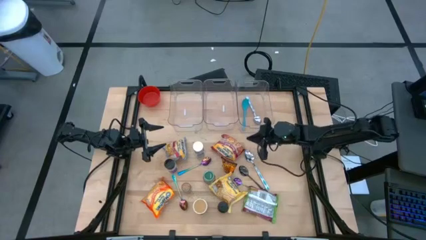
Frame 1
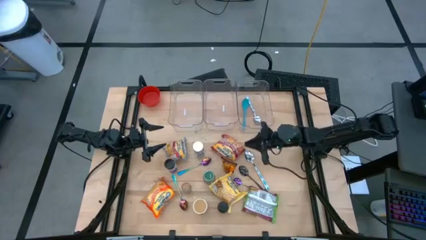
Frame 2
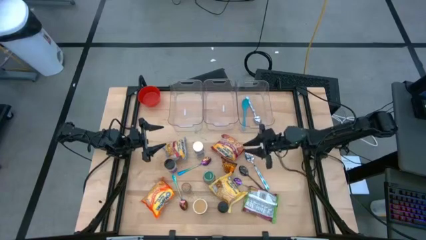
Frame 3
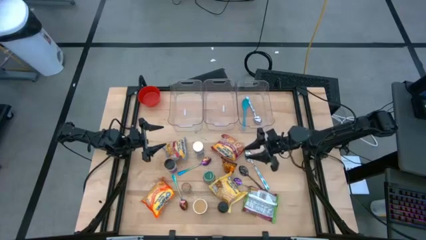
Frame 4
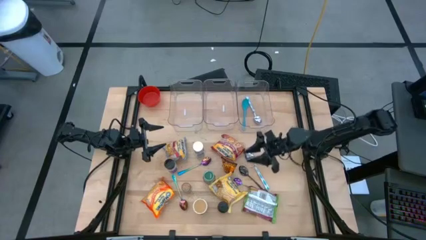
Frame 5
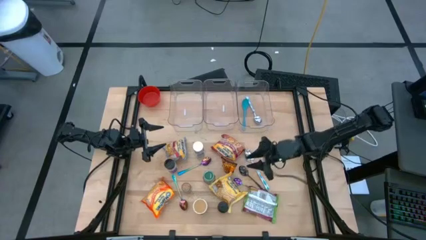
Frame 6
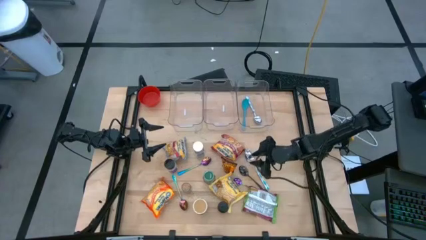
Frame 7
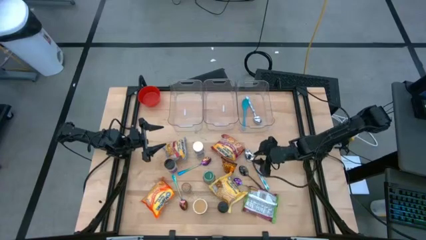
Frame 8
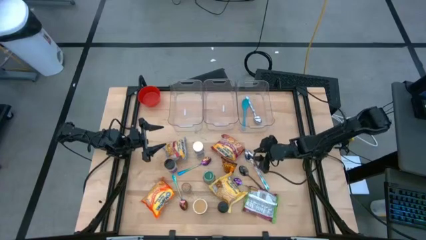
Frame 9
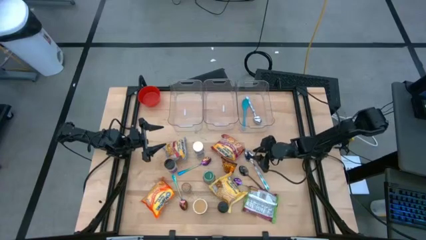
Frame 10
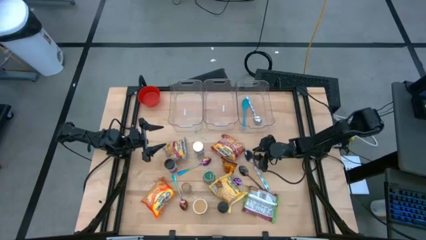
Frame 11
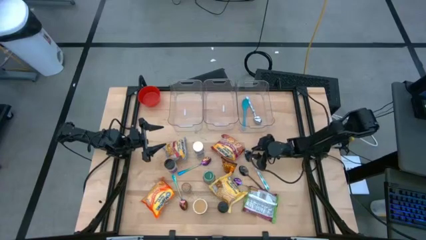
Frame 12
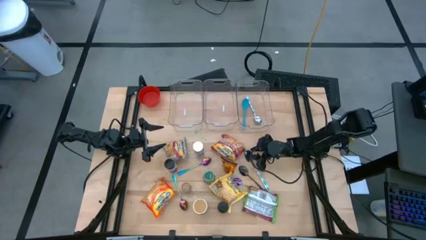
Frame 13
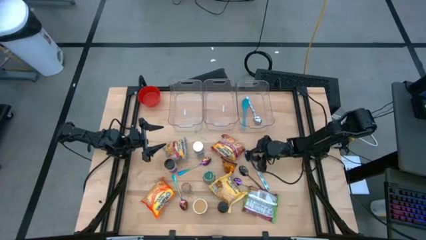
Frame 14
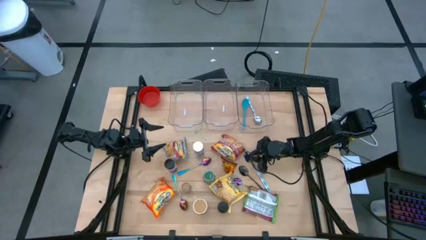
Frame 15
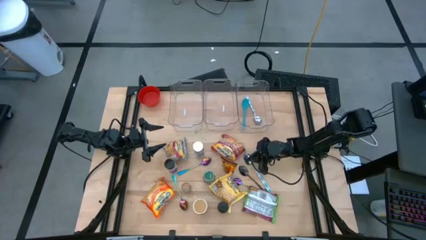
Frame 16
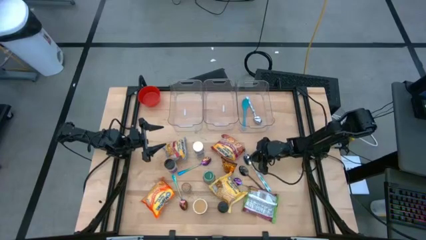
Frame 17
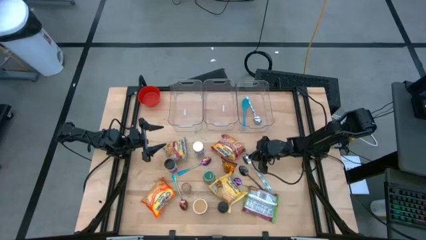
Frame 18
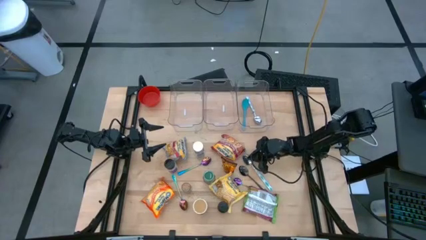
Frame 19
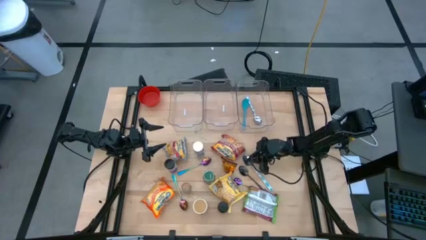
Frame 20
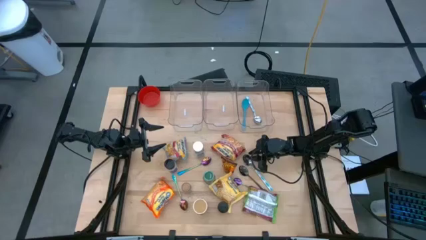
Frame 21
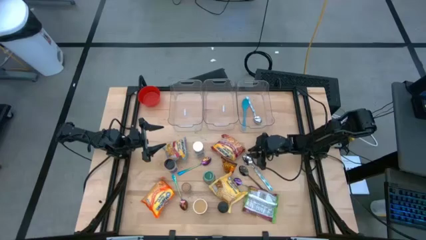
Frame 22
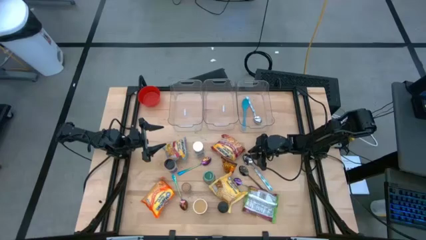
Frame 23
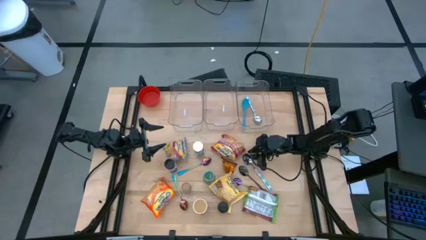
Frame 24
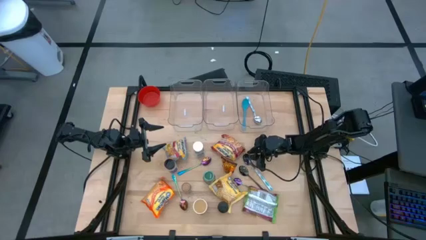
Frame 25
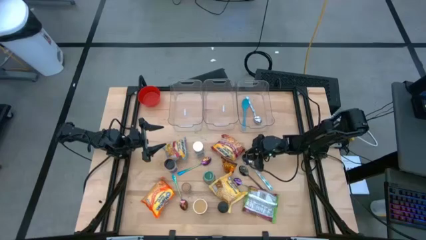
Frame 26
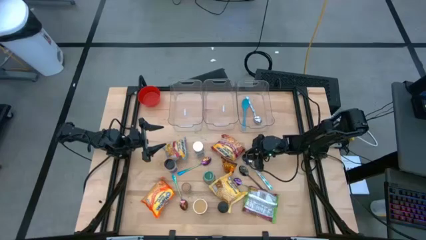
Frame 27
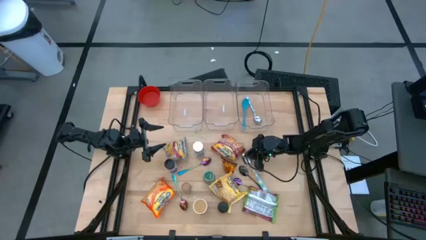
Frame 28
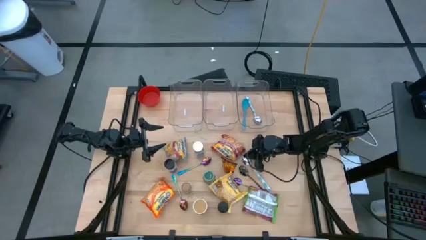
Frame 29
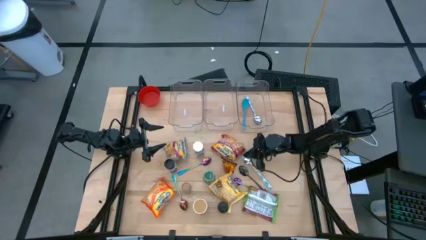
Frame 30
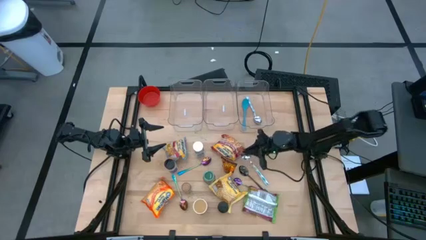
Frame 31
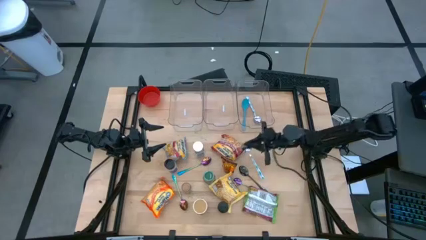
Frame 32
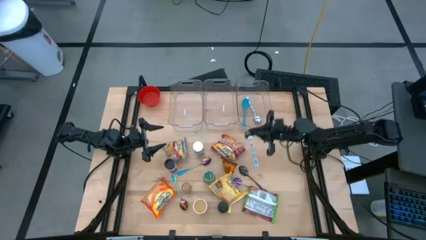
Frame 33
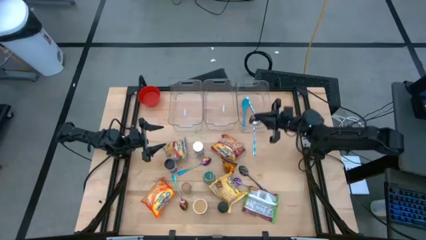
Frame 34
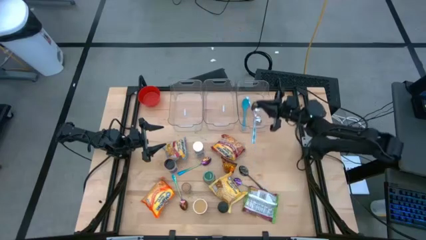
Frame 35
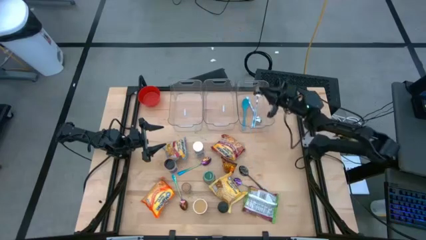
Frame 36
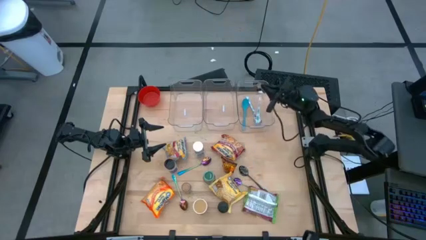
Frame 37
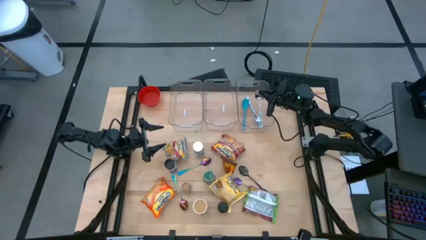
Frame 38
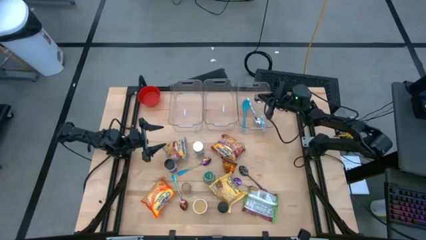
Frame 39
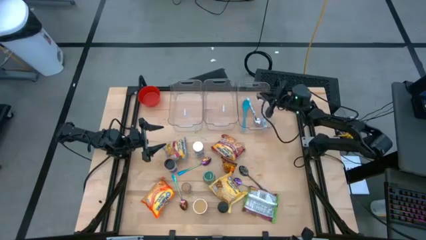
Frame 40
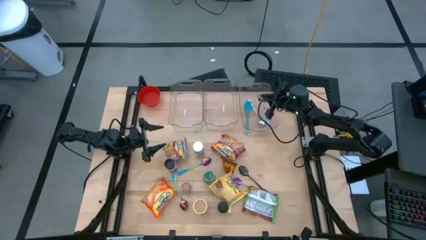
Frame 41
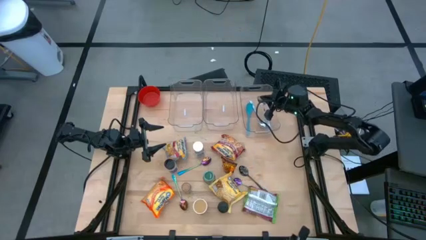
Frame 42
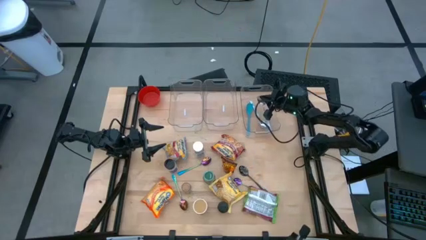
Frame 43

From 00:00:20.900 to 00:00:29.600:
Task: Pick & Place Food Item
Put the white spoon into the right transparent bin

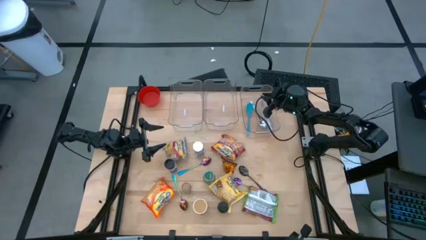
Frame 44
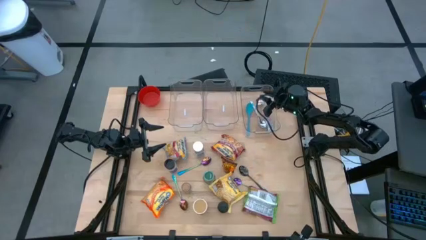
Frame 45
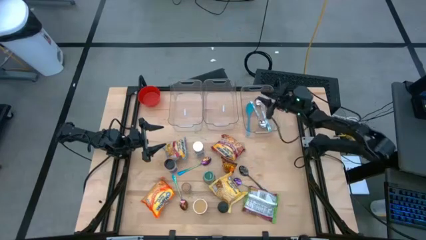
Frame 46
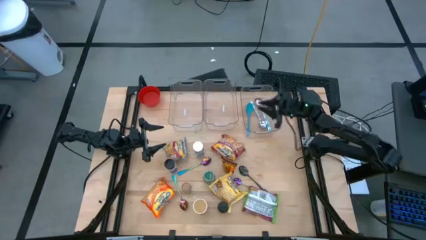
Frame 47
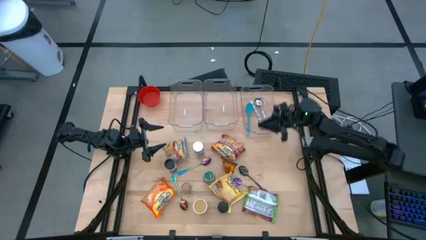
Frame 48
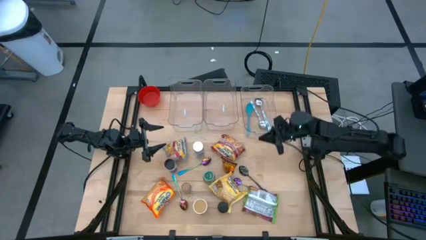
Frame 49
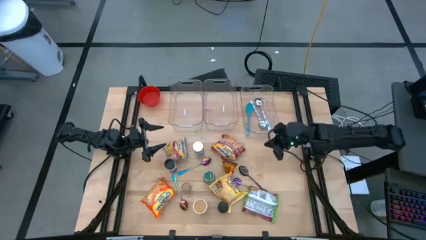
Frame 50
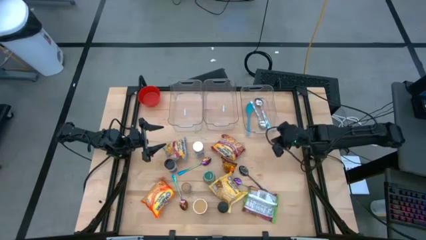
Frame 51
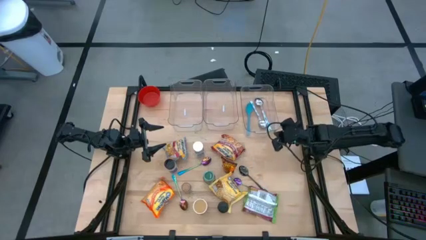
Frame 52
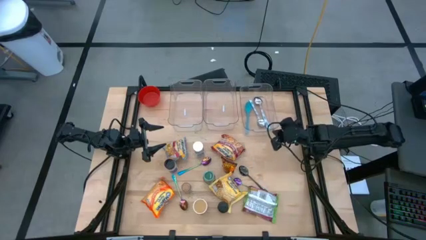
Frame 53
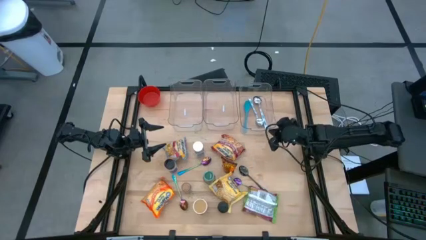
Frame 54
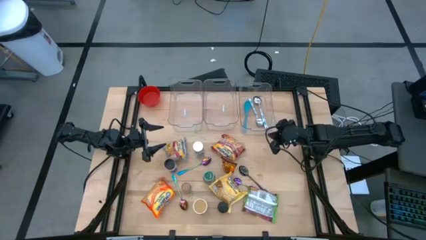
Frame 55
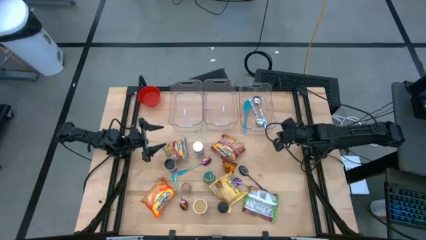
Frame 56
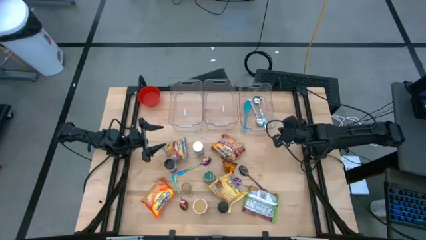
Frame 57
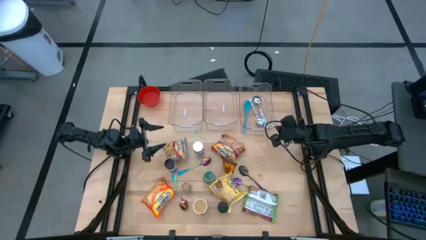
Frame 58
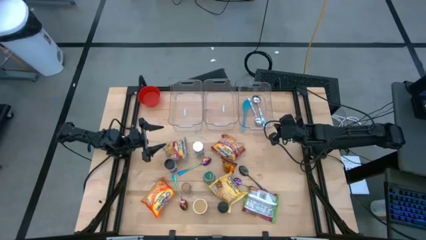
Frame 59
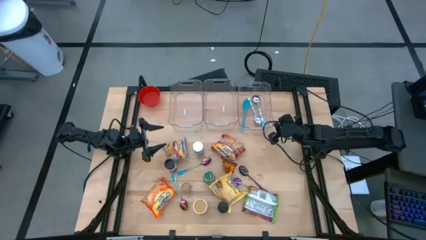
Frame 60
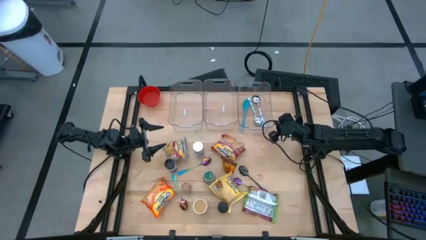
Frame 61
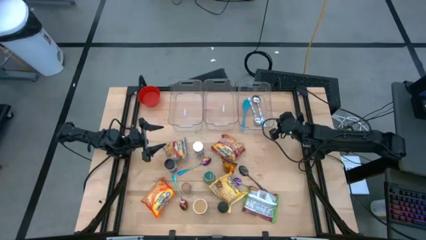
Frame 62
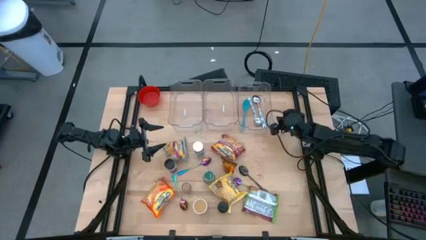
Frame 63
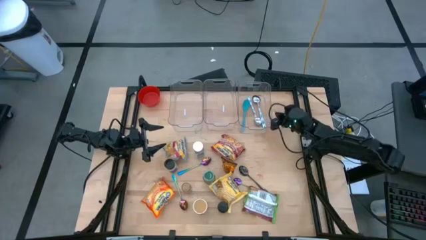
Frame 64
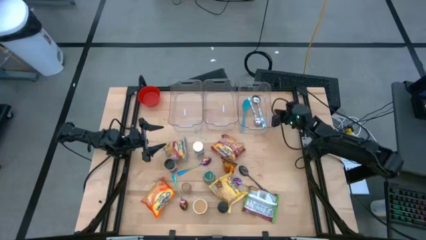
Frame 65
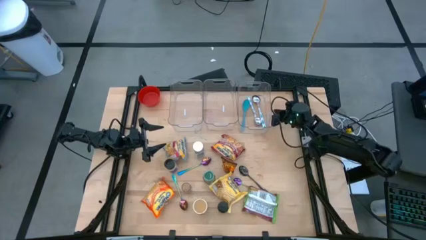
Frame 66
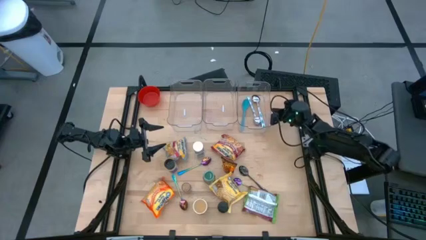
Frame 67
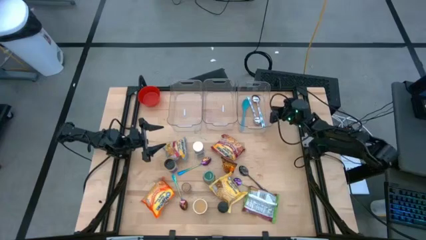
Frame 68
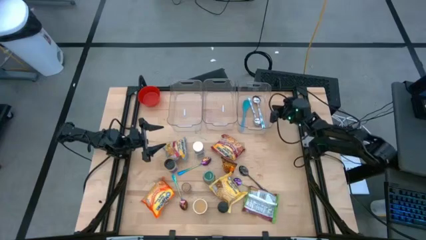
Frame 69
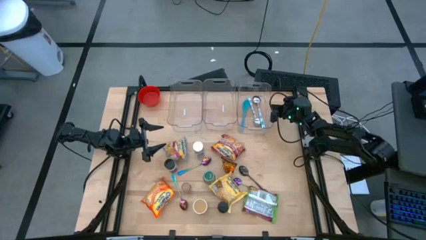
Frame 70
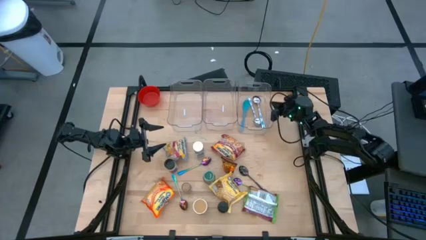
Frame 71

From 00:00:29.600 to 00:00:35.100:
Adjust the right transparent bin

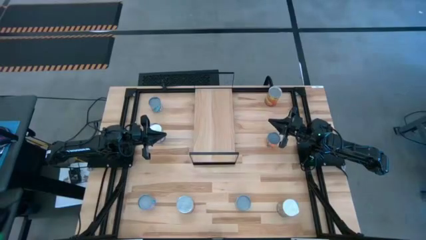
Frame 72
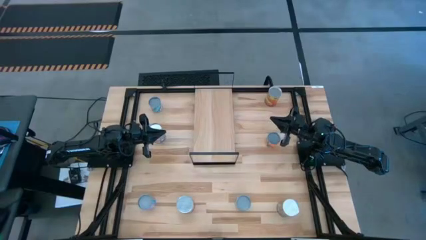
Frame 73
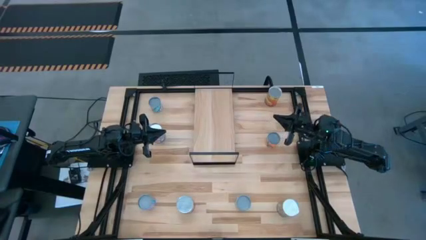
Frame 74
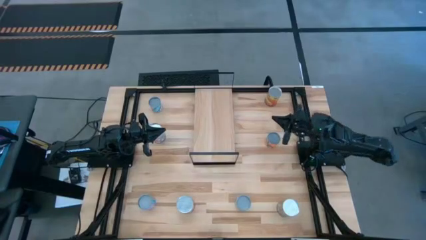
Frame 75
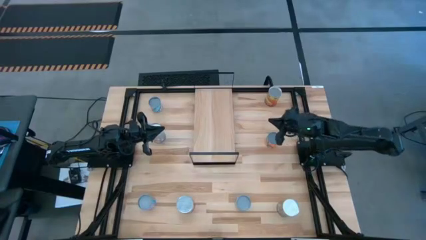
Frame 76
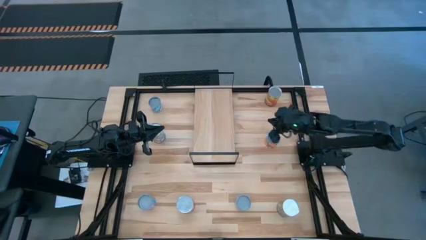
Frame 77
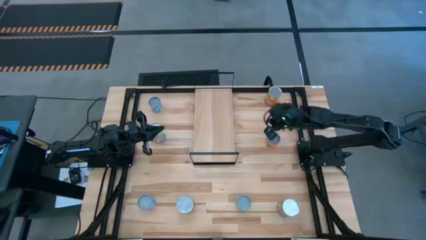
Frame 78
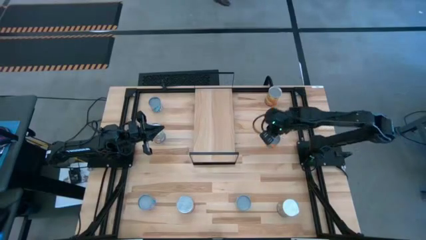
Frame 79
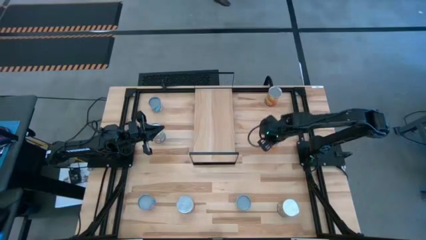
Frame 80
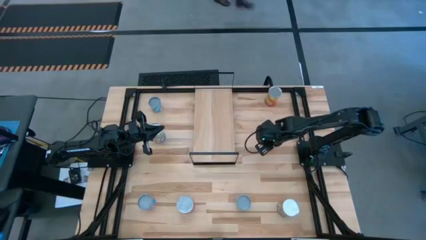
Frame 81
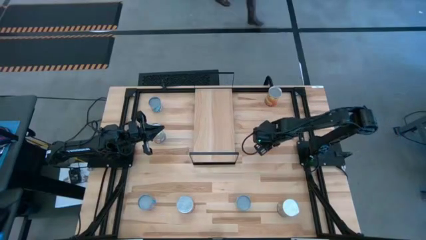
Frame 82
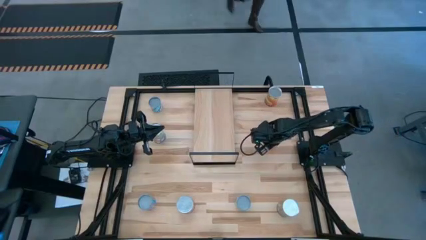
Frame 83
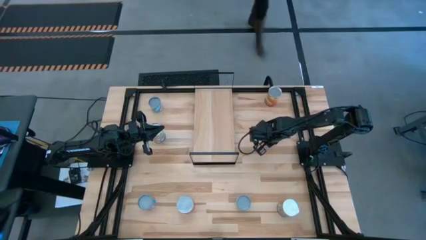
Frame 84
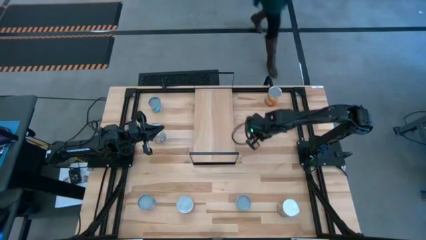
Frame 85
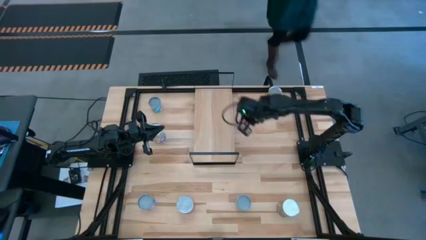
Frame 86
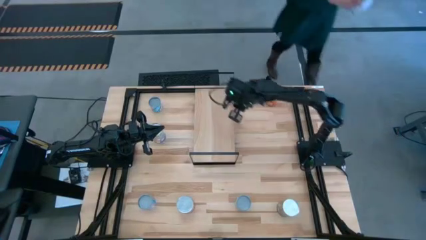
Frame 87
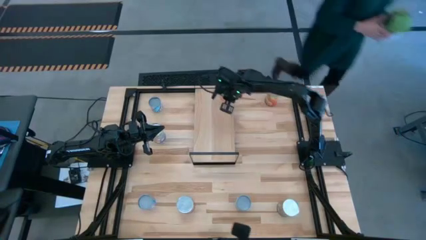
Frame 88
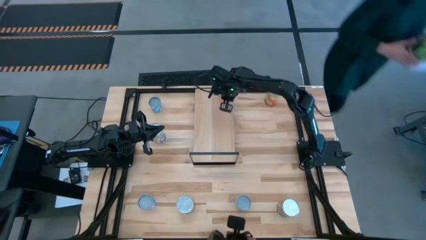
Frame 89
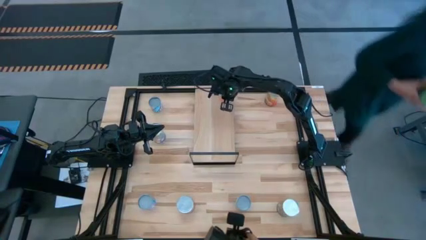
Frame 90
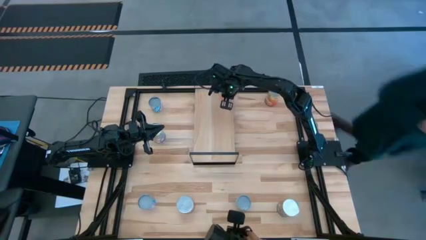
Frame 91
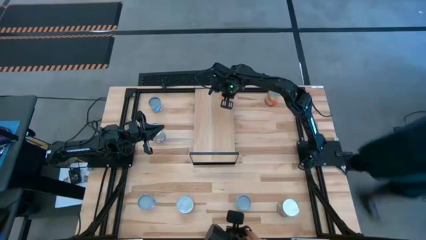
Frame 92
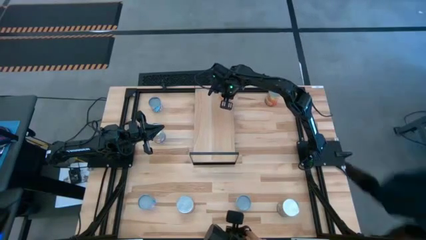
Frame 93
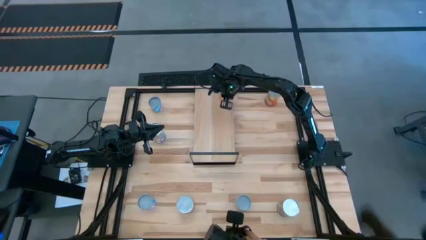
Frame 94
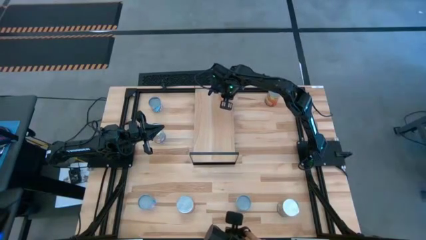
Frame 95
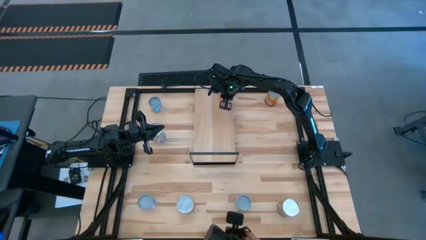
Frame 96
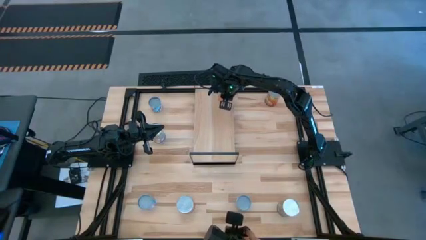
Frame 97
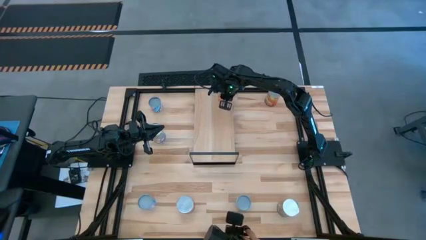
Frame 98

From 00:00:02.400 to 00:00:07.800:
Task: Pick and place cans onto a shelf
Put the small dark green can on the shelf
